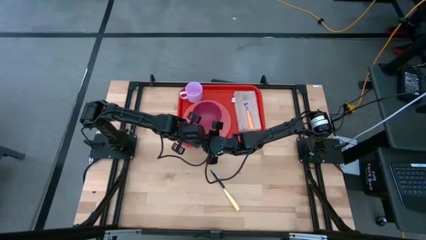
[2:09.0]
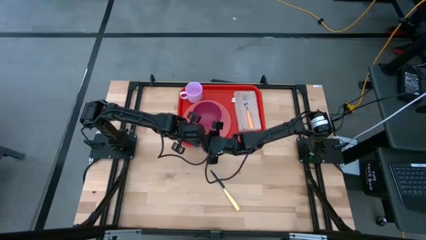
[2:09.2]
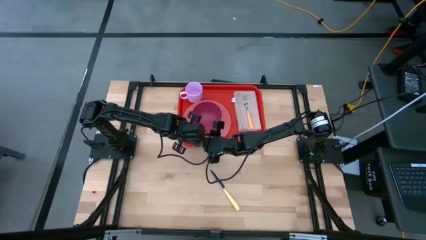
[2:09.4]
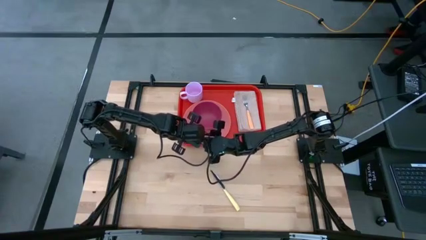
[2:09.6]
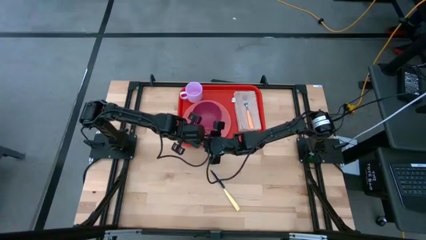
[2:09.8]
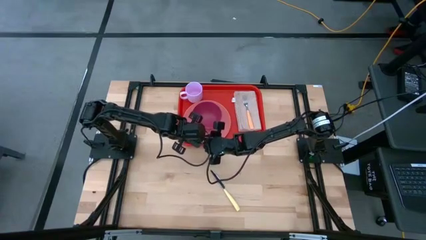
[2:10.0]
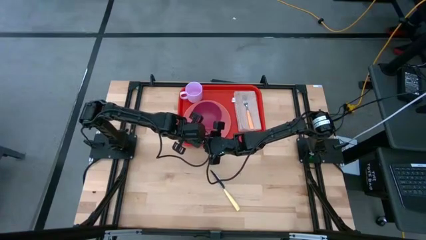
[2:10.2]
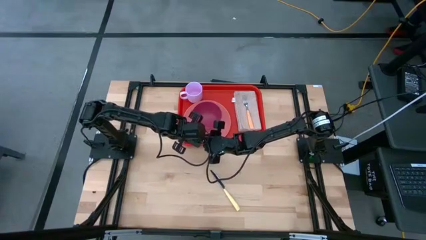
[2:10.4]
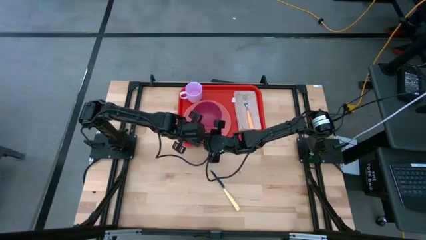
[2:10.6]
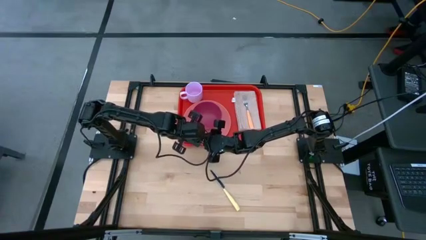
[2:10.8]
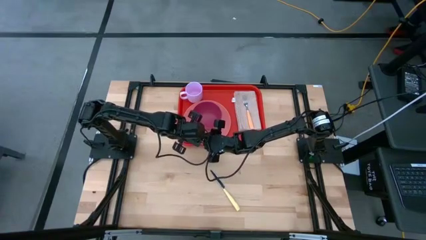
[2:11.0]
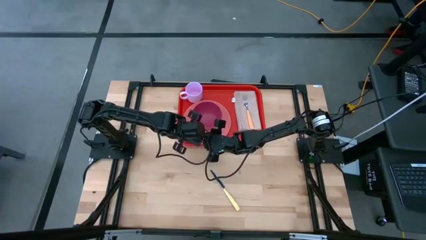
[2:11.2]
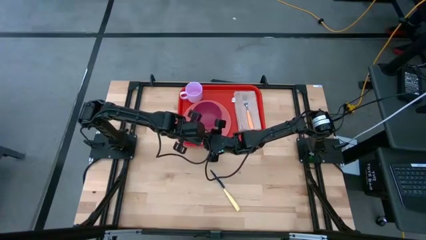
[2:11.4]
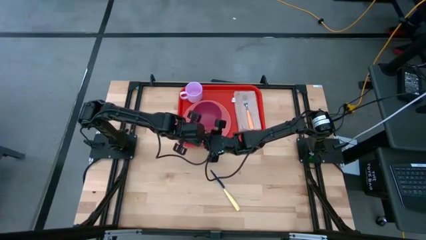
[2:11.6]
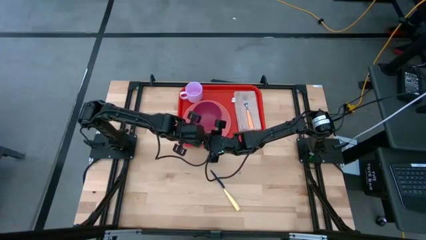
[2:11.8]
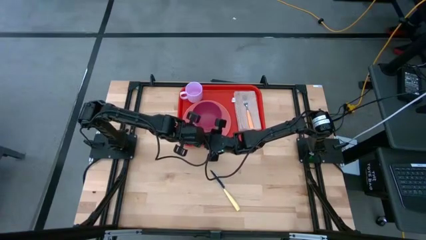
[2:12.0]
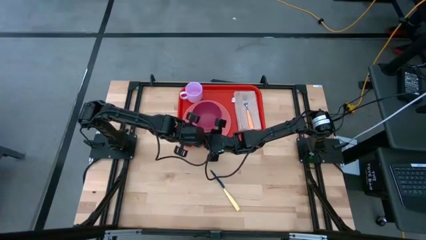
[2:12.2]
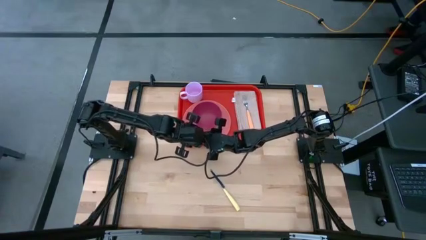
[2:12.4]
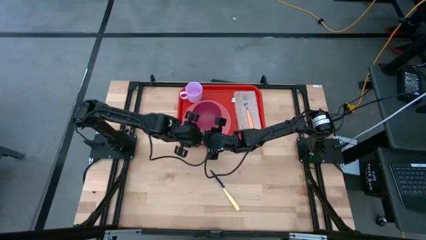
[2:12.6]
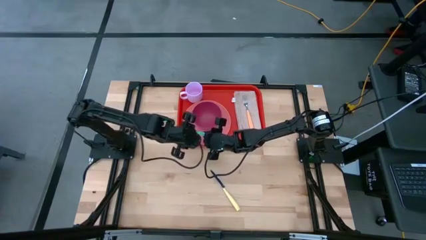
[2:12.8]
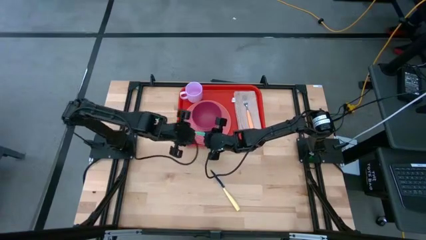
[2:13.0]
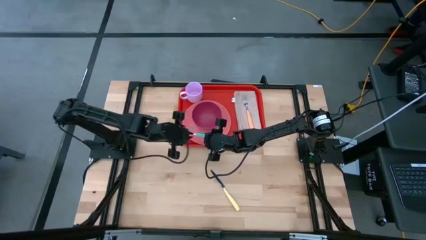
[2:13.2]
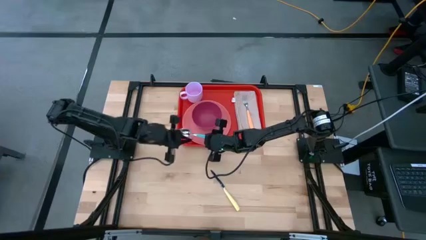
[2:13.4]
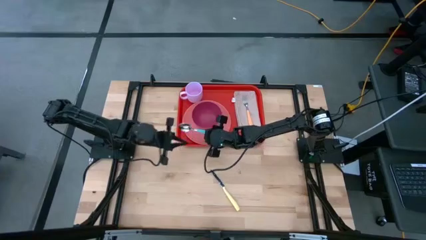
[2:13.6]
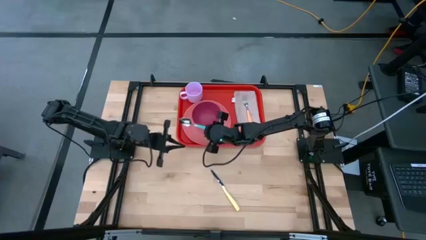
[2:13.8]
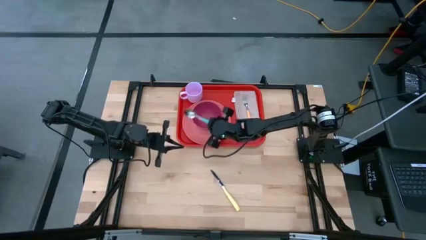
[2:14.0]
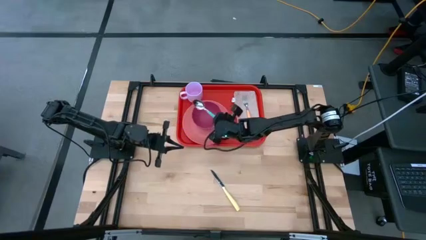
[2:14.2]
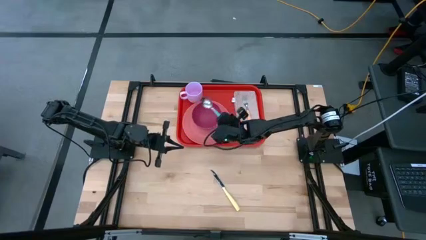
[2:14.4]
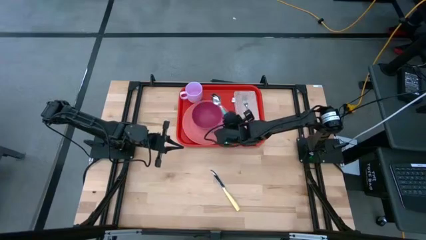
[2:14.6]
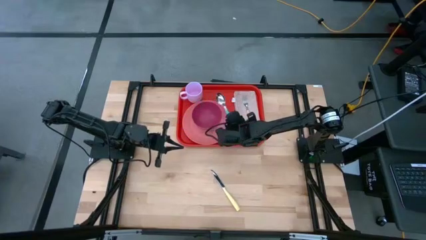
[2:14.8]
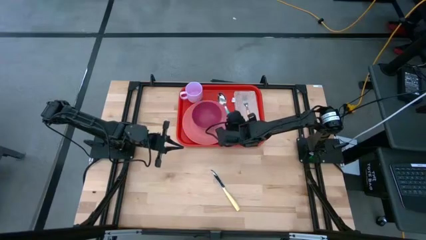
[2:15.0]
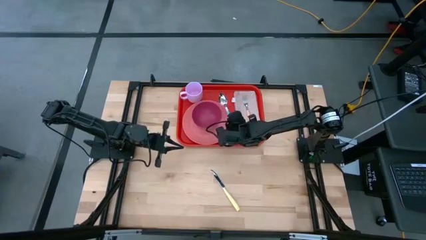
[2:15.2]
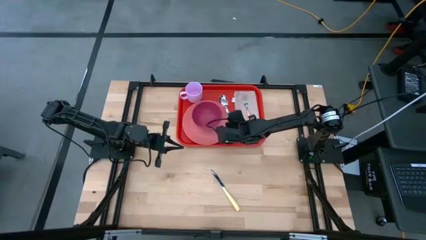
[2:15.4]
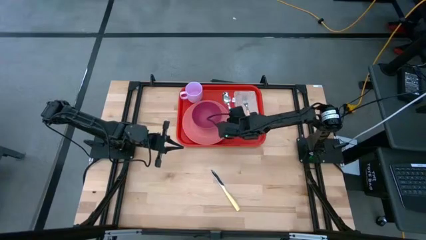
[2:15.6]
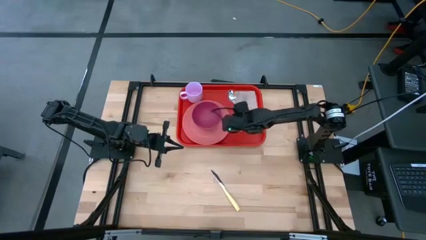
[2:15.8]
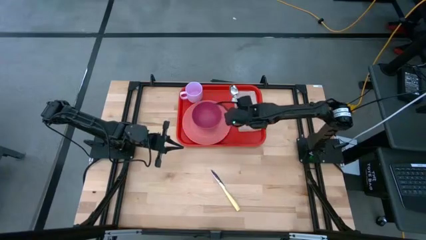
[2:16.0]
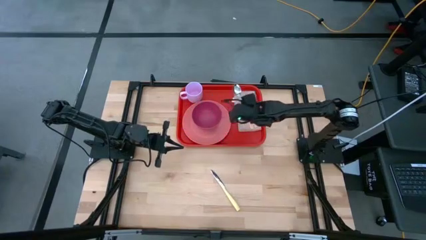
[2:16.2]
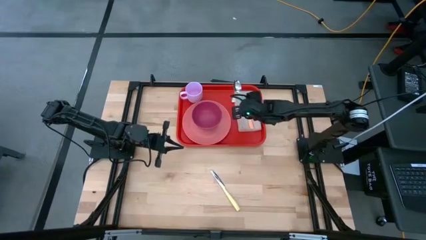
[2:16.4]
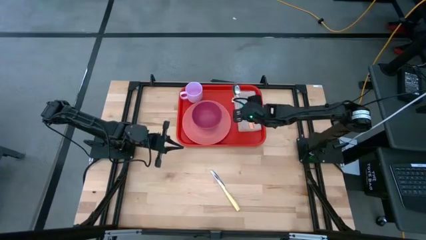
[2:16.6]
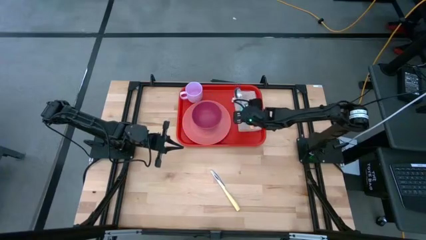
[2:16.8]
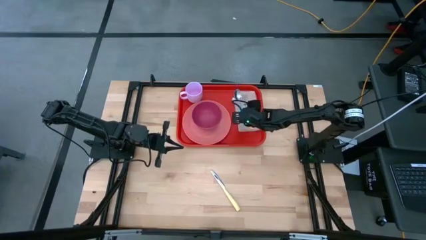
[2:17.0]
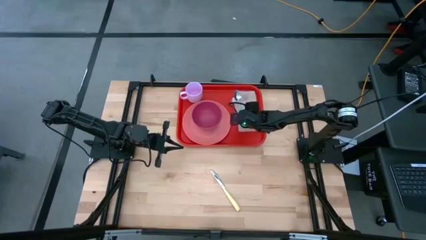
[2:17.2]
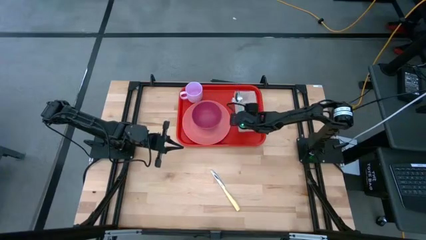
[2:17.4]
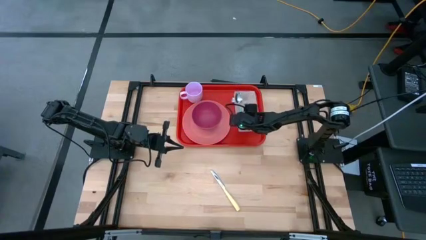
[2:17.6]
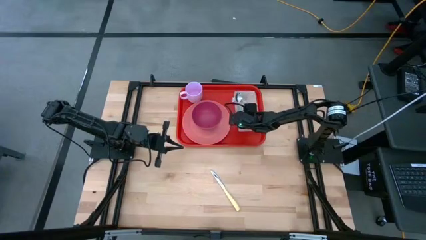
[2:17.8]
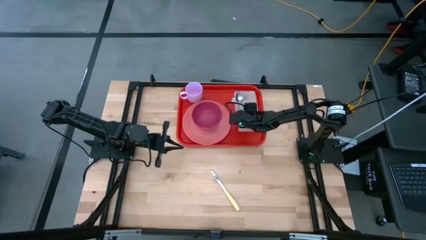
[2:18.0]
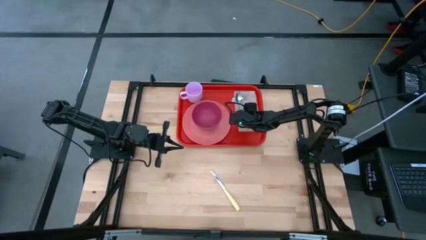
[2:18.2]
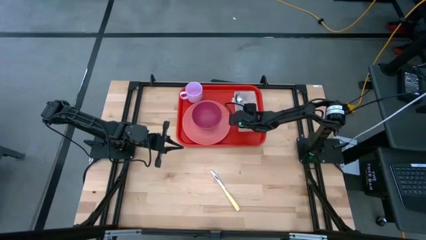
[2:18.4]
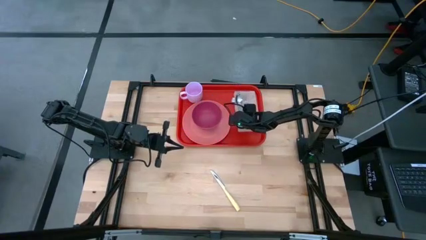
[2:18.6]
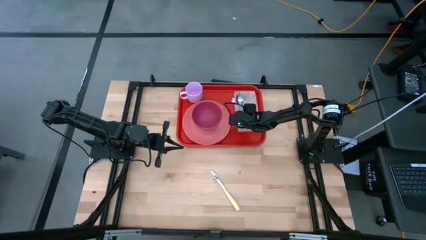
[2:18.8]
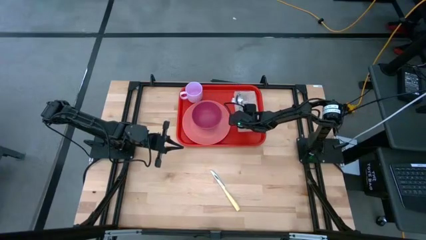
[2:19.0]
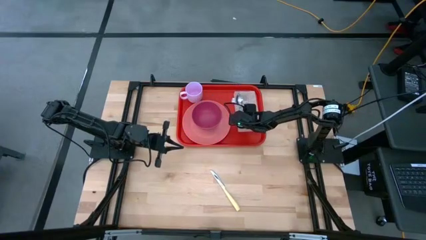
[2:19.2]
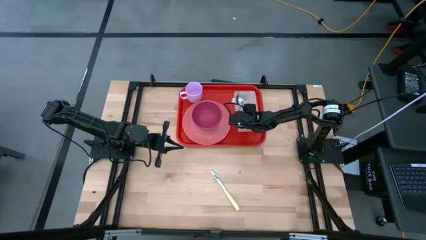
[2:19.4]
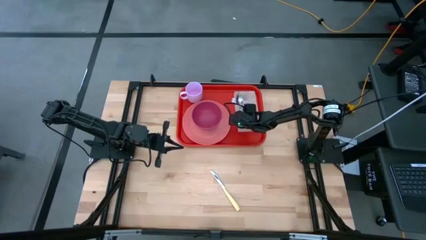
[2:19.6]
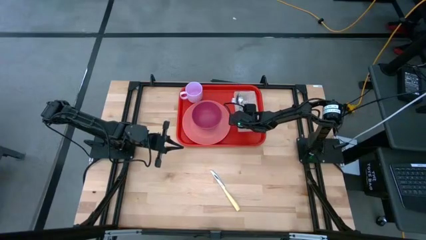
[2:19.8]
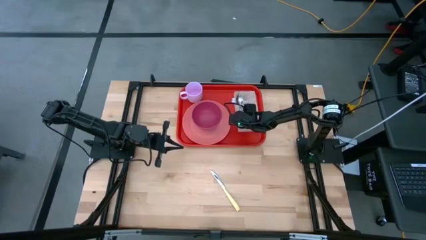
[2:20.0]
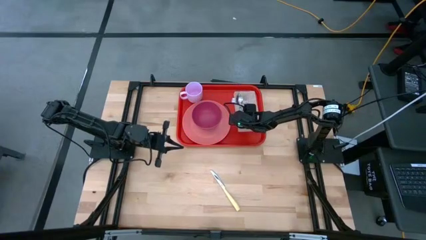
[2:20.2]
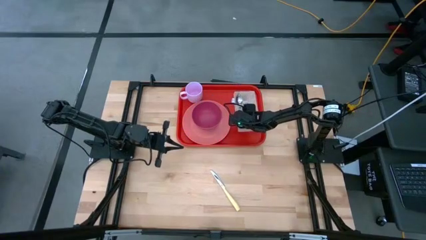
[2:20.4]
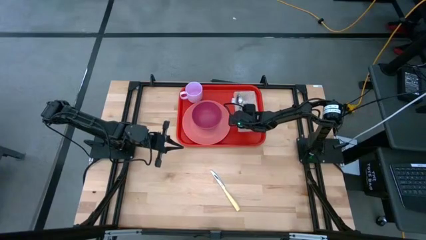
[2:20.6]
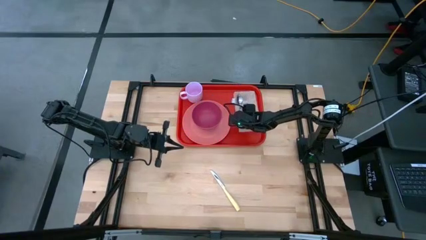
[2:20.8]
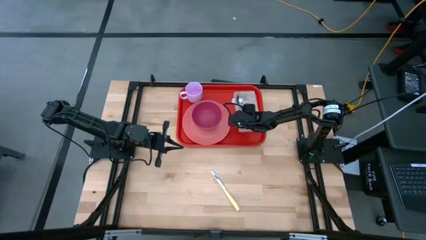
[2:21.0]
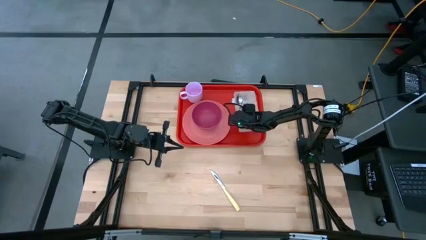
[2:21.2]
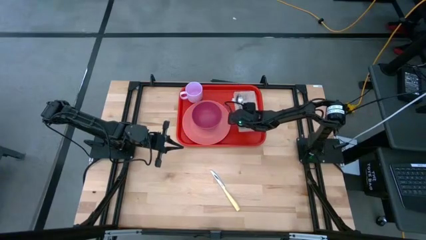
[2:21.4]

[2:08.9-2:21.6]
Task: Set up tray
Put the blue spoon to the left side of the orange fork on the light brown table napkin on the red tray
